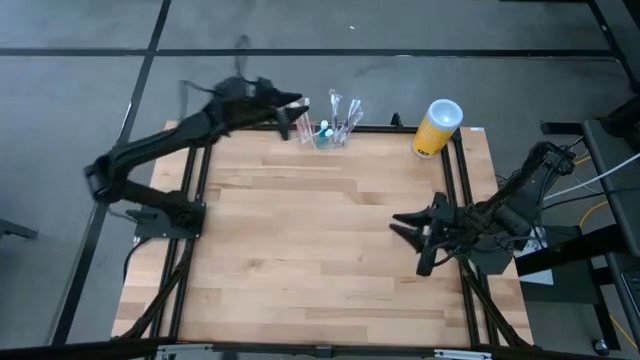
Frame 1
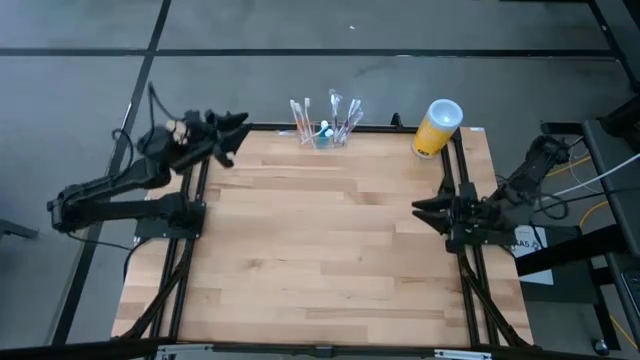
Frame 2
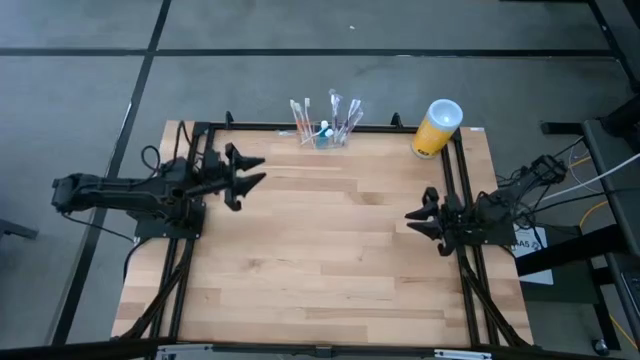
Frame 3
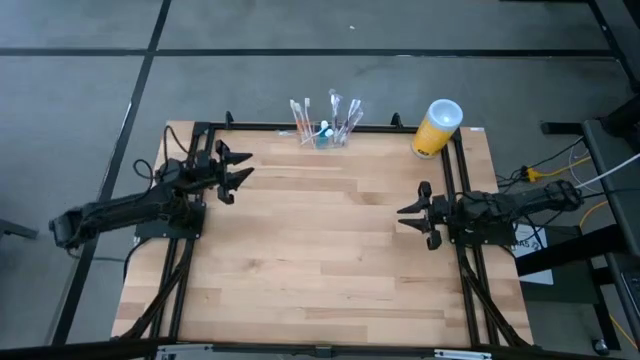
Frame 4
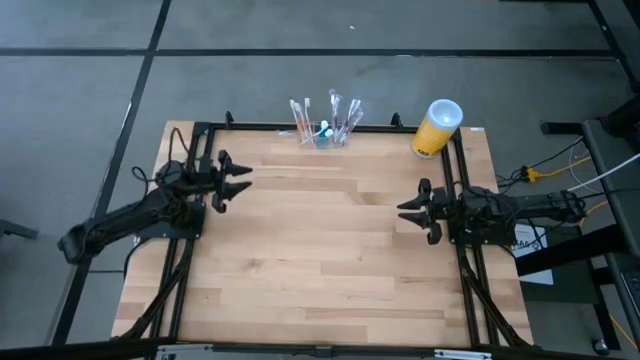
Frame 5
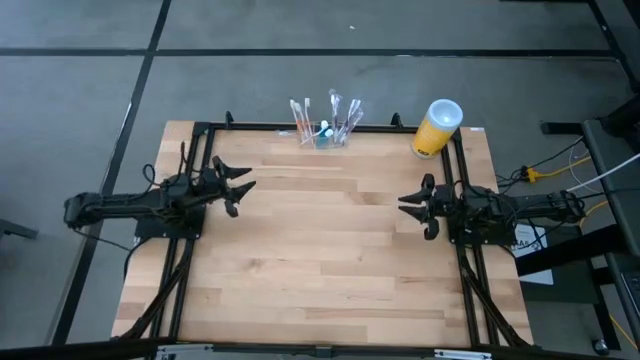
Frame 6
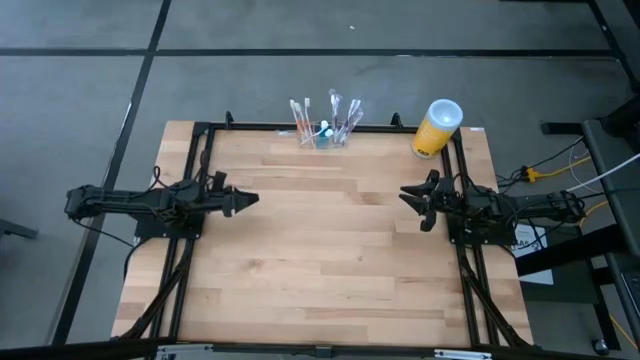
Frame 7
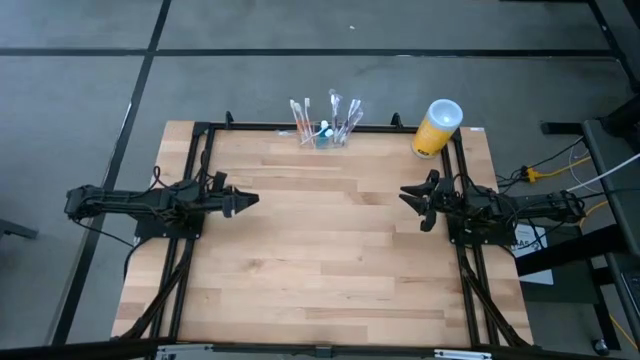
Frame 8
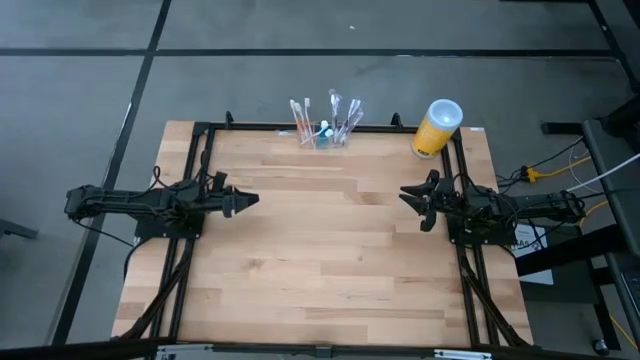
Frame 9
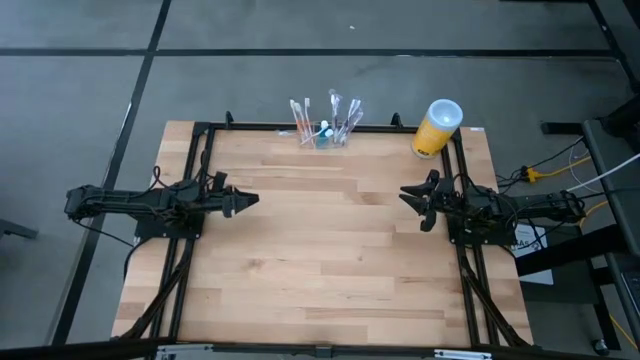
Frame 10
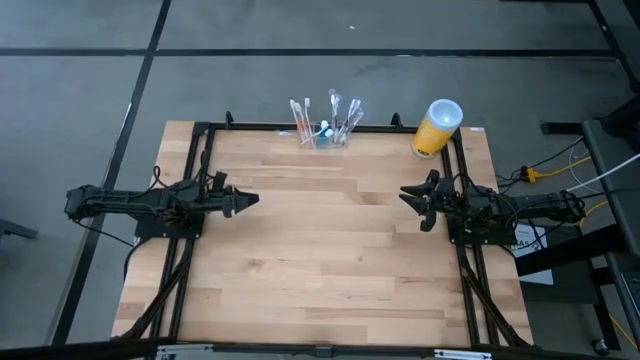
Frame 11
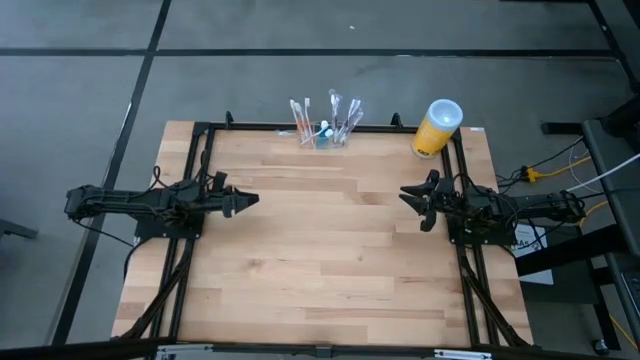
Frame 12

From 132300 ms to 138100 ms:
Task: Pick & Place toothbrushing station
Return to Home Position

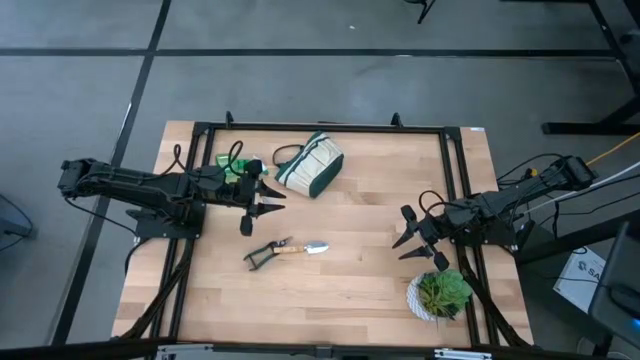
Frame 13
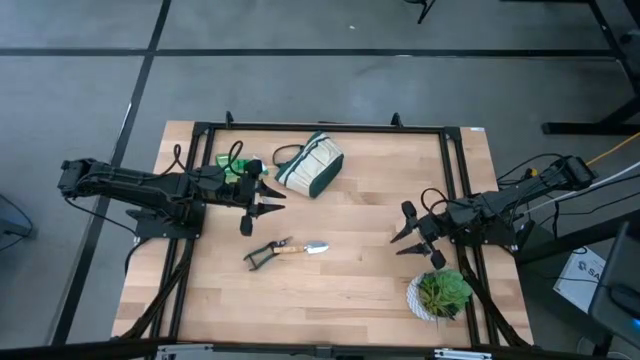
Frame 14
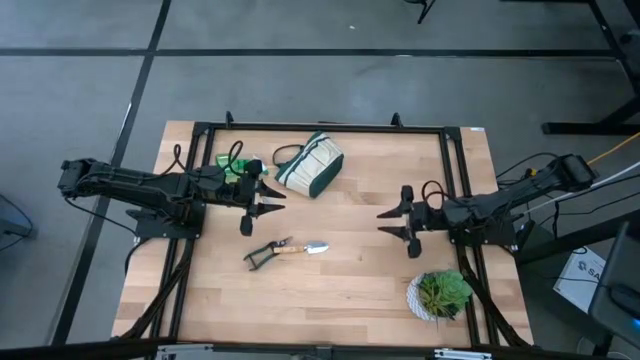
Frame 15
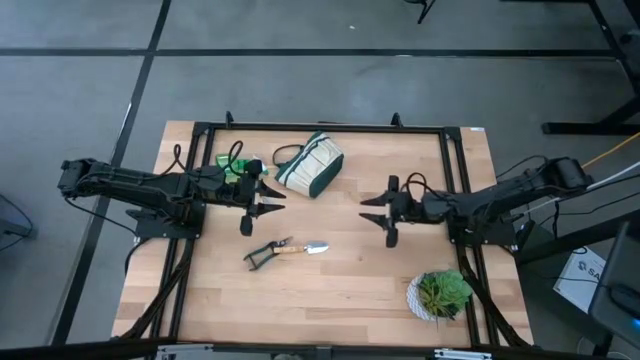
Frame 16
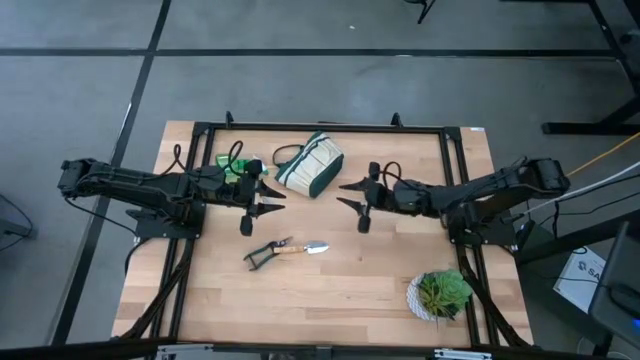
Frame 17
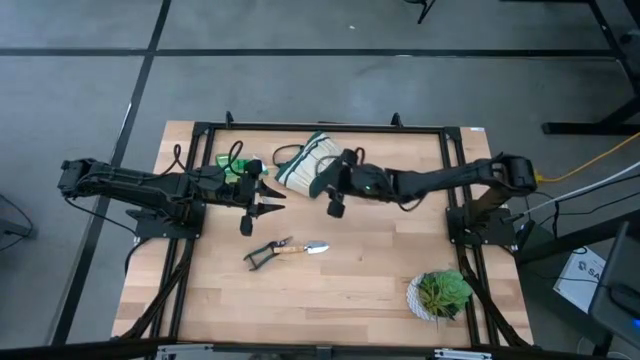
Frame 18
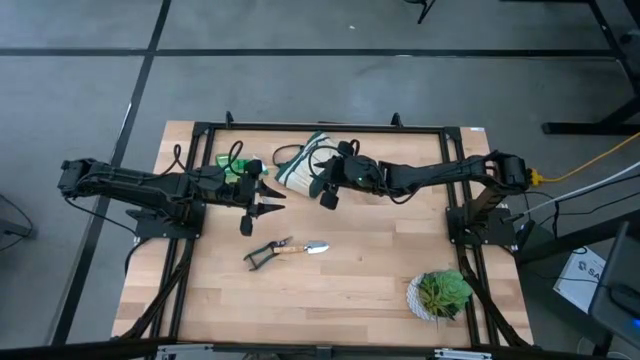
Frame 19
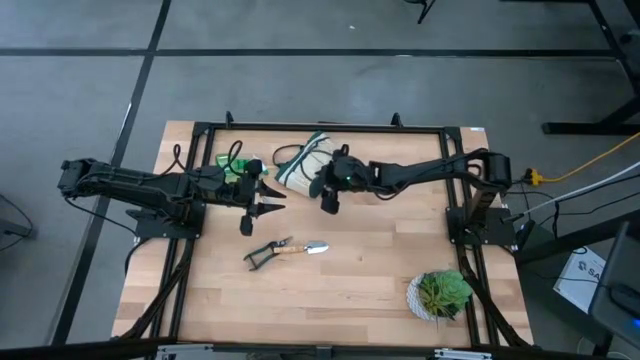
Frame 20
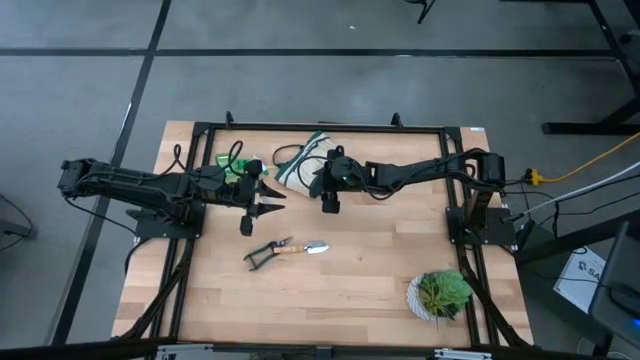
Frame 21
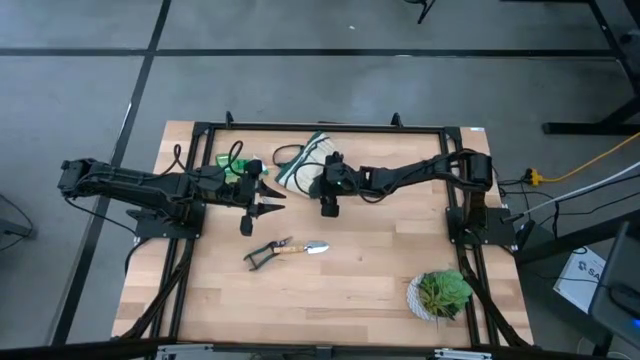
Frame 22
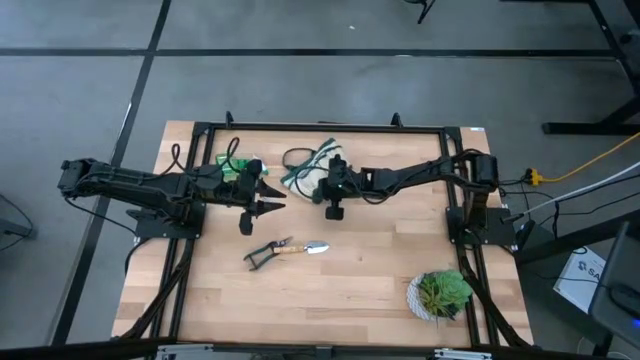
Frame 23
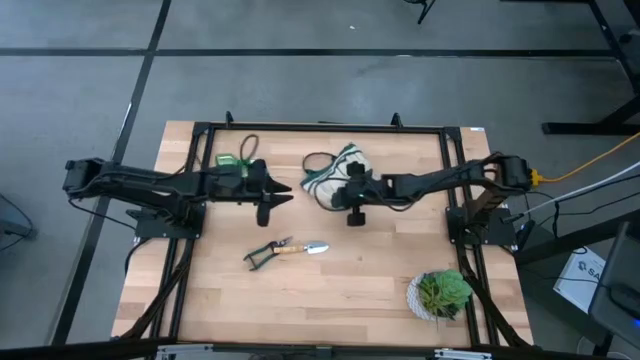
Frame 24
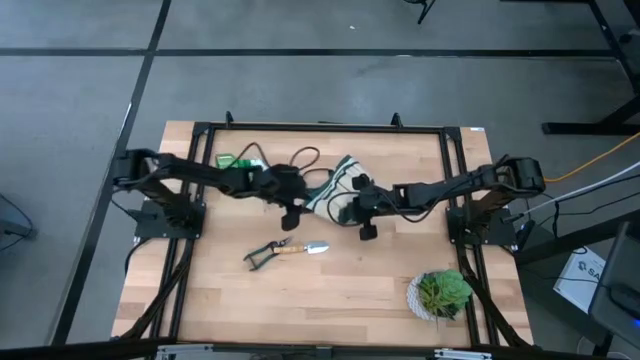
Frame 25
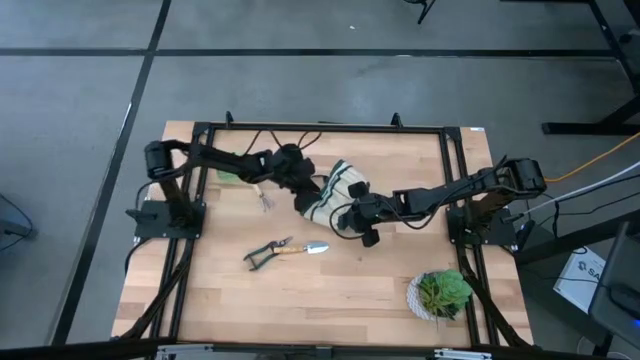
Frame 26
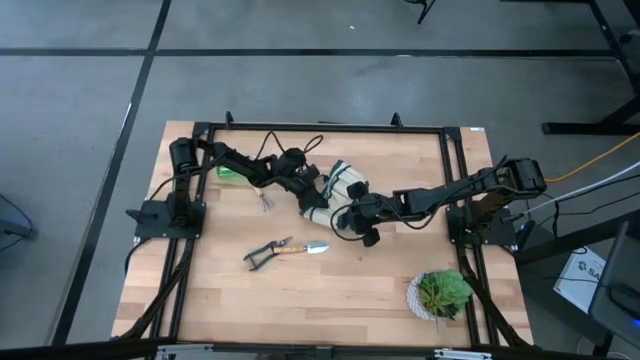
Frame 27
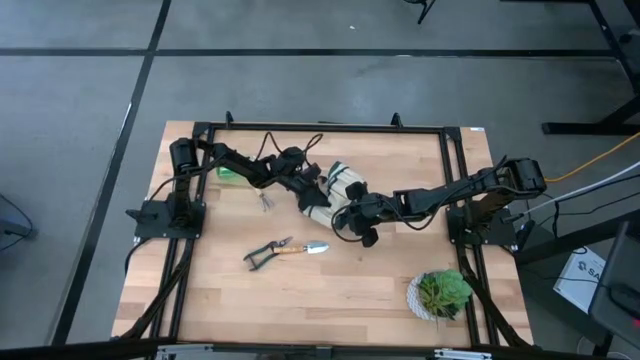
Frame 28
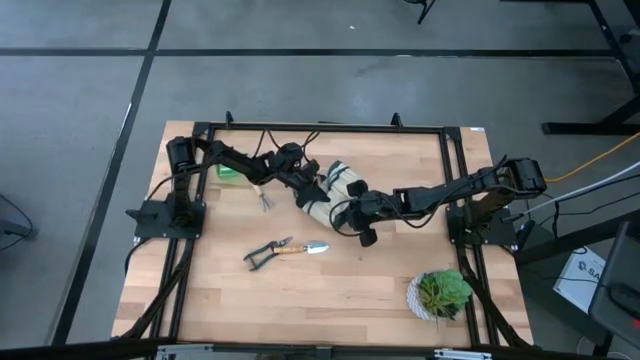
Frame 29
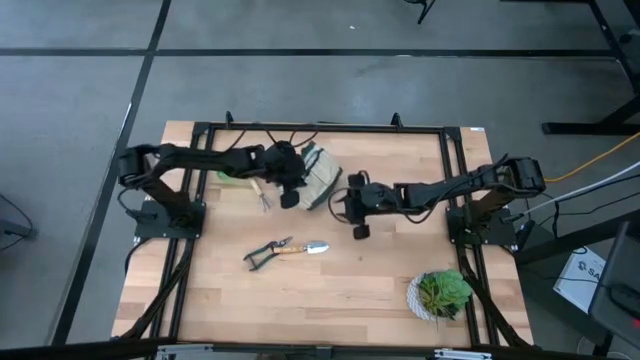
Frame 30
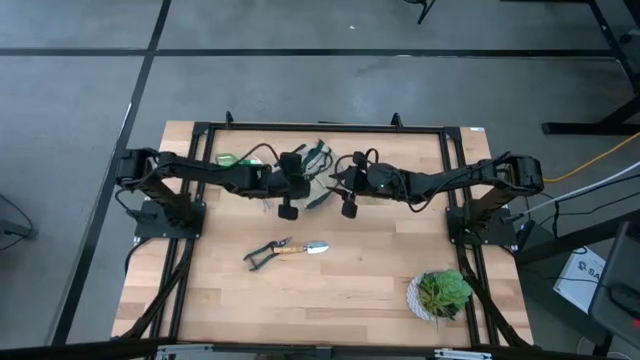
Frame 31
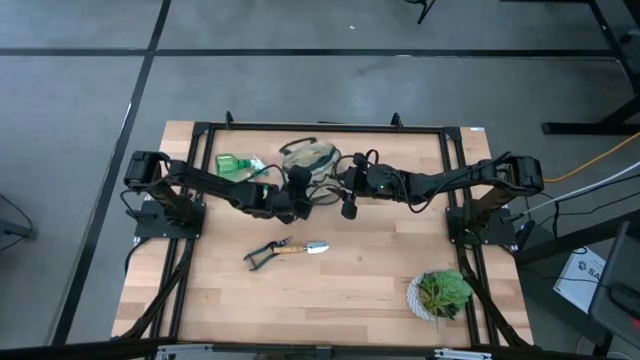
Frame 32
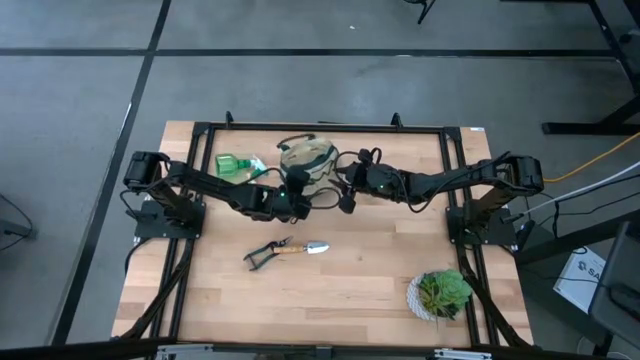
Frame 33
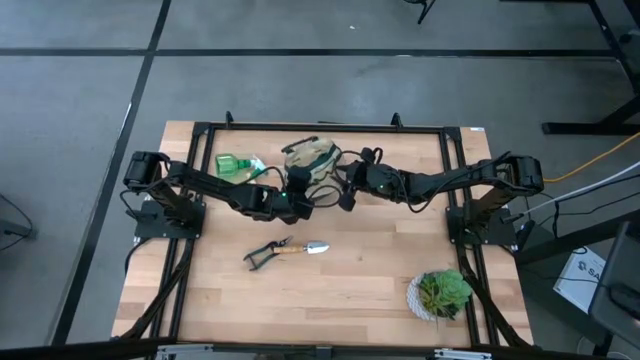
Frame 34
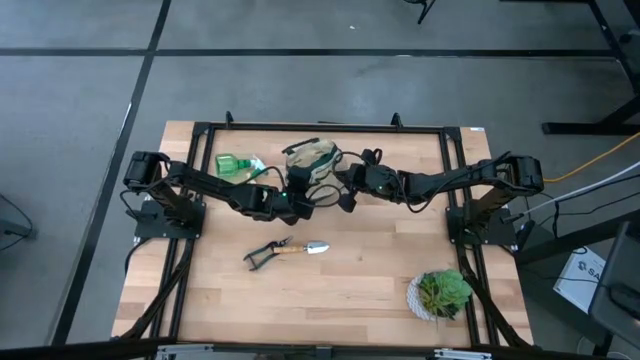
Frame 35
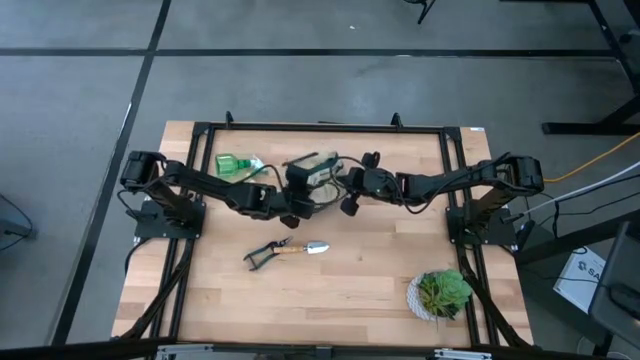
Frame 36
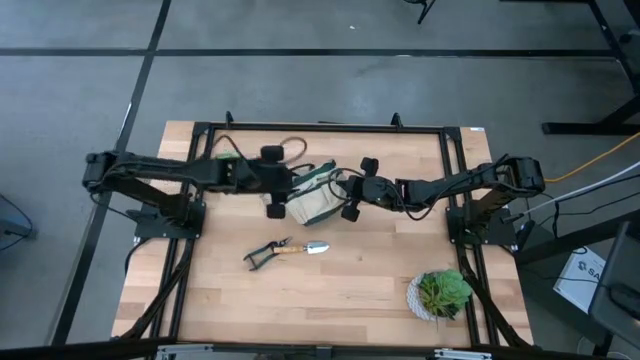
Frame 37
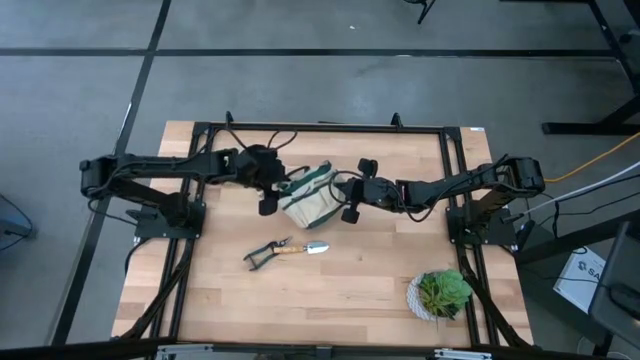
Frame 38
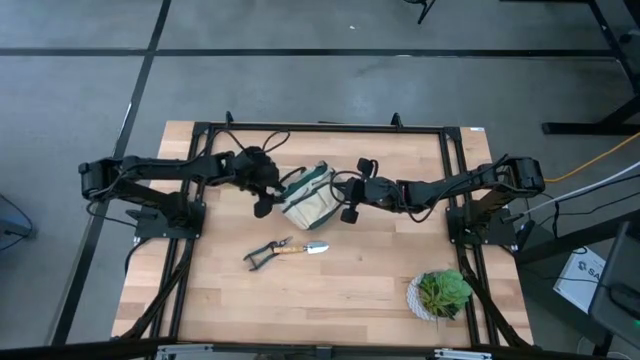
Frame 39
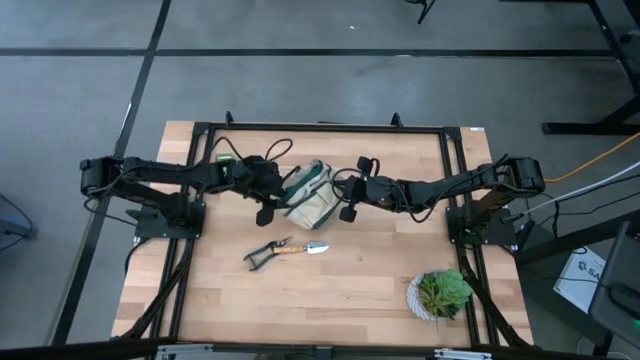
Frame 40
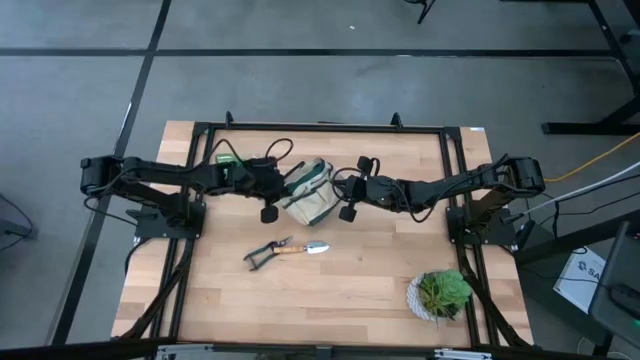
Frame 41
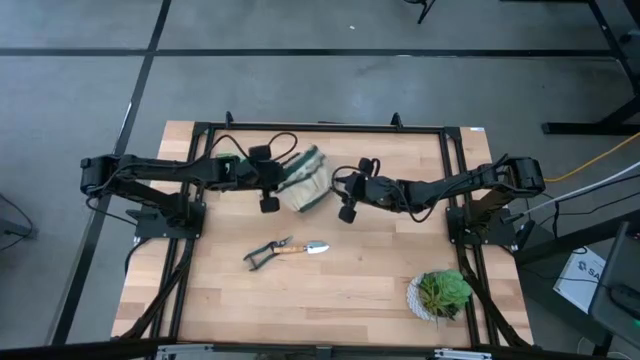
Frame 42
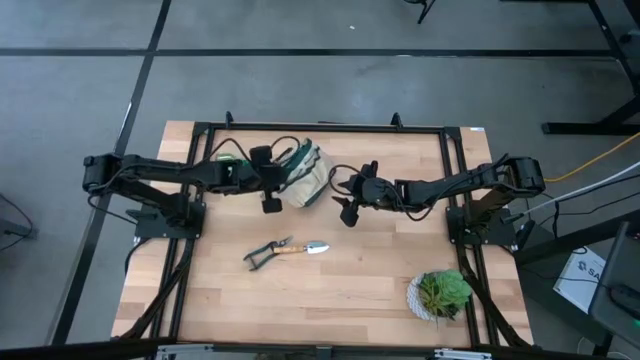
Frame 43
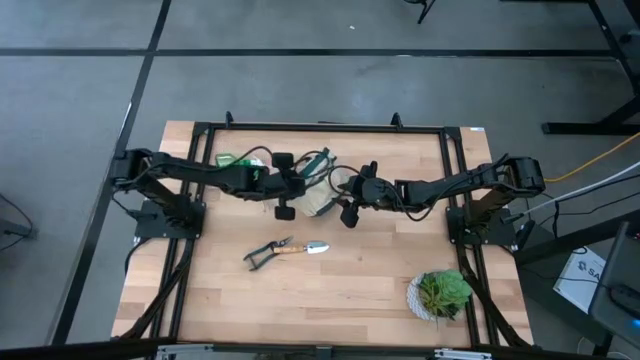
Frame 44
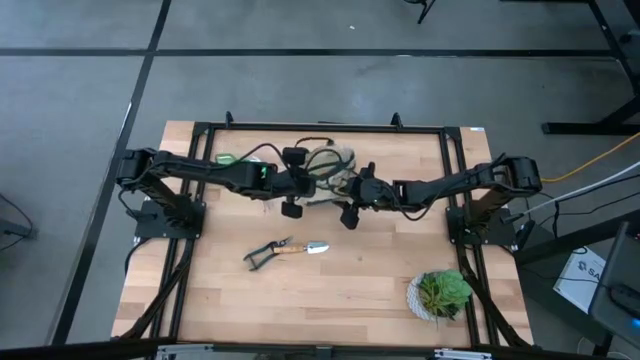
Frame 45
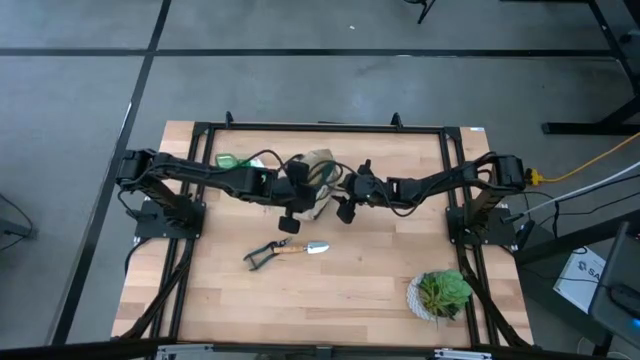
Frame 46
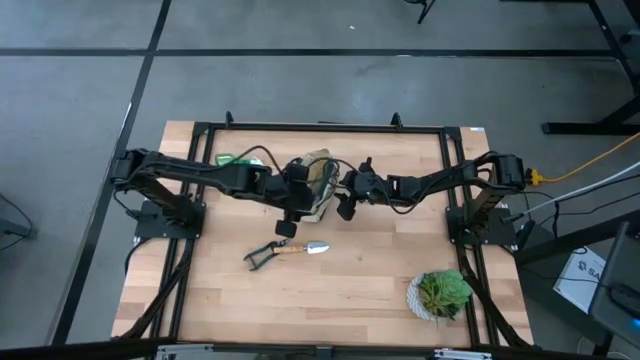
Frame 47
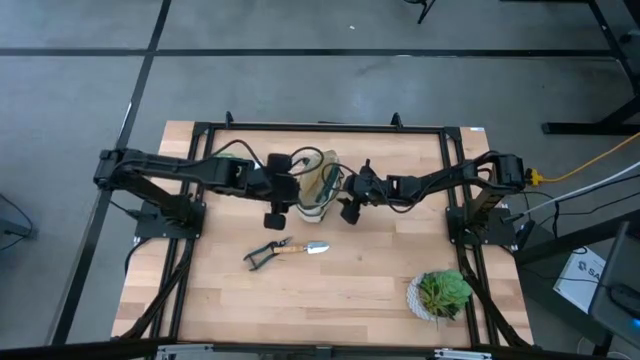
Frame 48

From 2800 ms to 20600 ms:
Task: Pick & Place Garden tools in Gardening bag
Prepare the gardening bag
